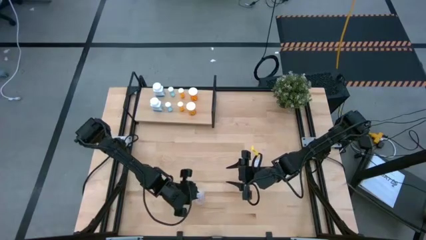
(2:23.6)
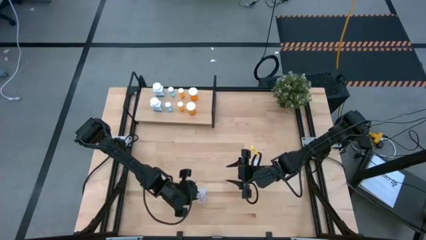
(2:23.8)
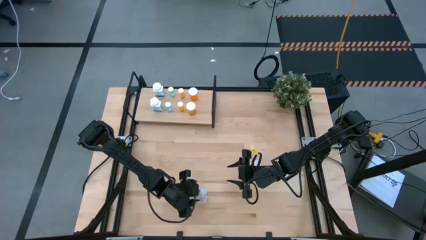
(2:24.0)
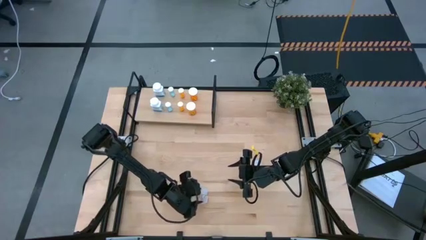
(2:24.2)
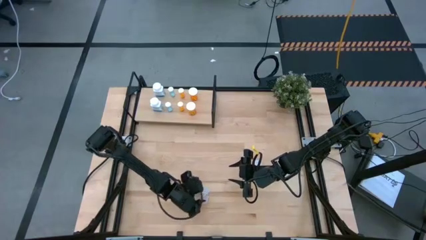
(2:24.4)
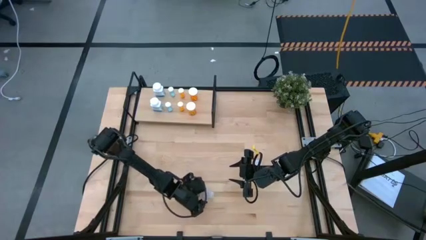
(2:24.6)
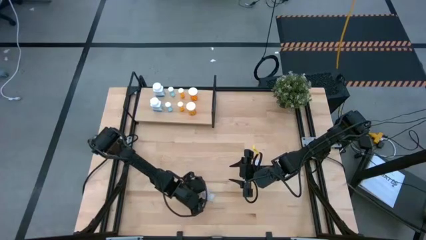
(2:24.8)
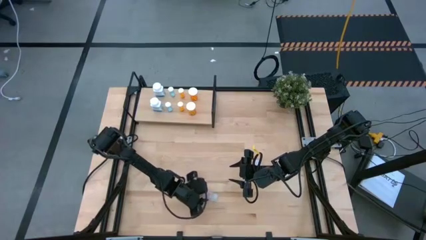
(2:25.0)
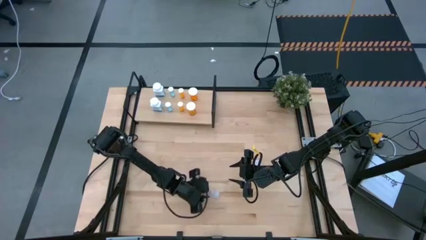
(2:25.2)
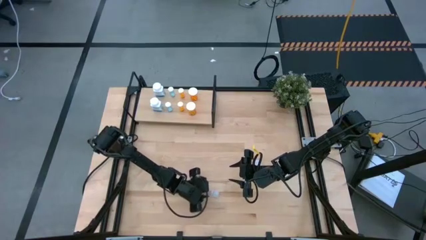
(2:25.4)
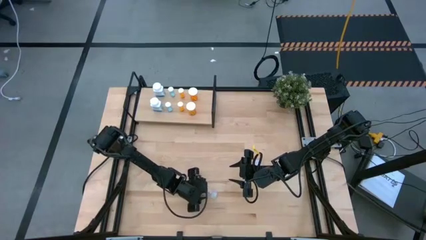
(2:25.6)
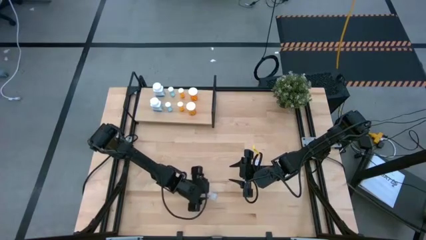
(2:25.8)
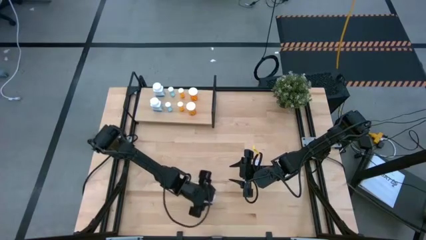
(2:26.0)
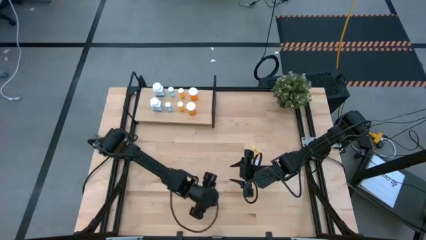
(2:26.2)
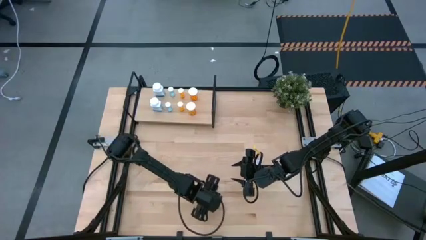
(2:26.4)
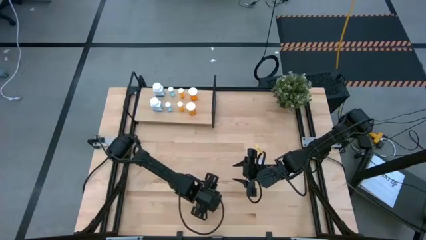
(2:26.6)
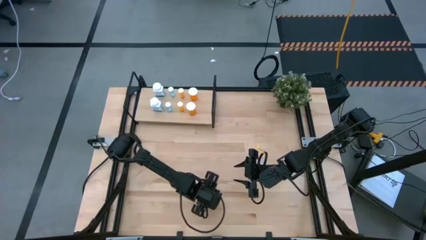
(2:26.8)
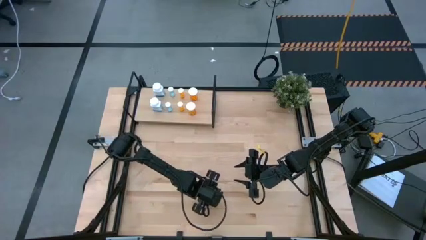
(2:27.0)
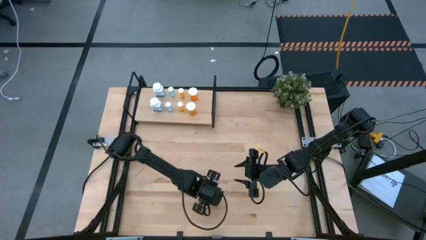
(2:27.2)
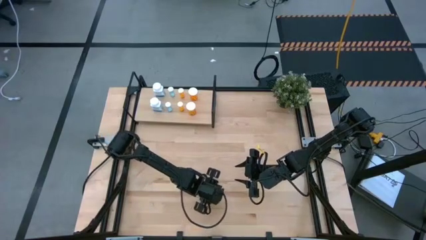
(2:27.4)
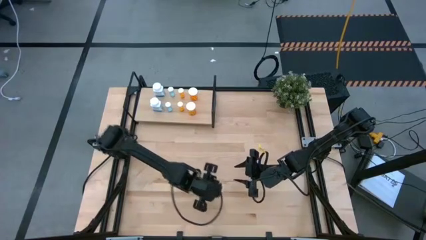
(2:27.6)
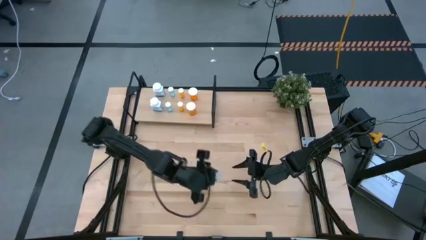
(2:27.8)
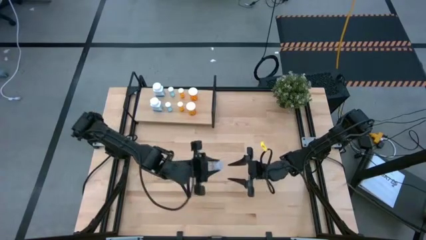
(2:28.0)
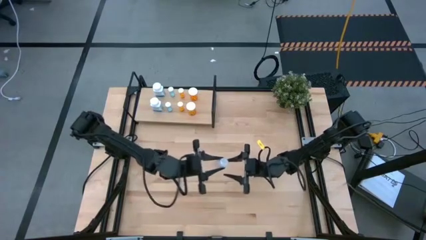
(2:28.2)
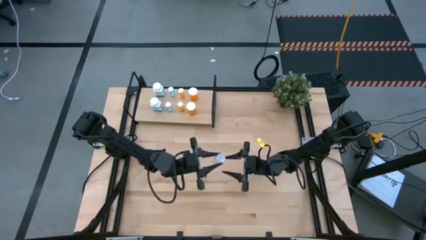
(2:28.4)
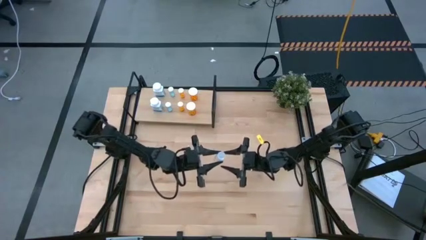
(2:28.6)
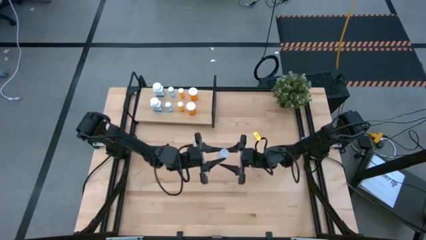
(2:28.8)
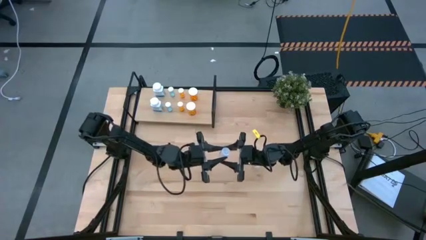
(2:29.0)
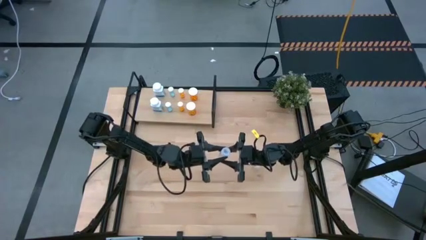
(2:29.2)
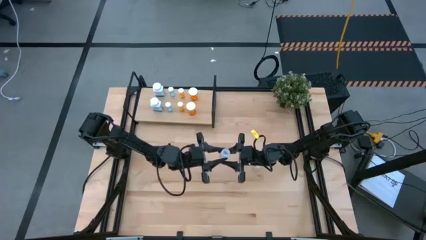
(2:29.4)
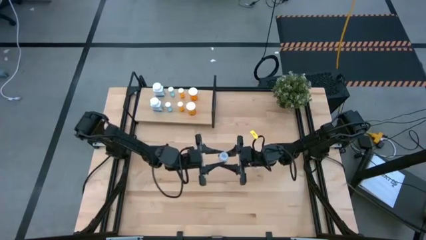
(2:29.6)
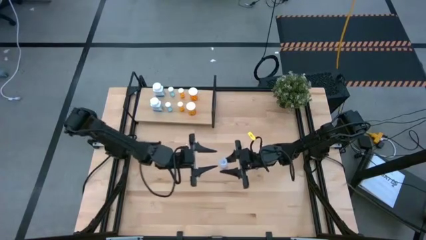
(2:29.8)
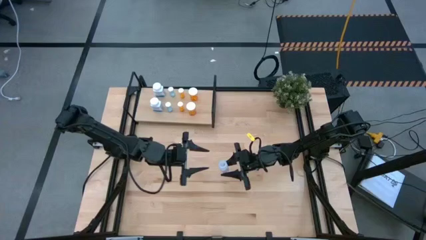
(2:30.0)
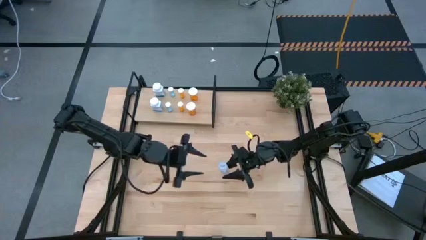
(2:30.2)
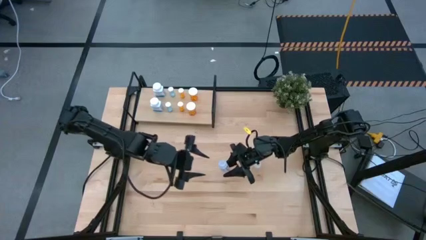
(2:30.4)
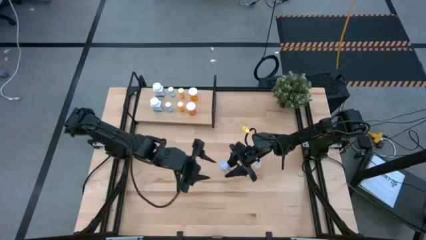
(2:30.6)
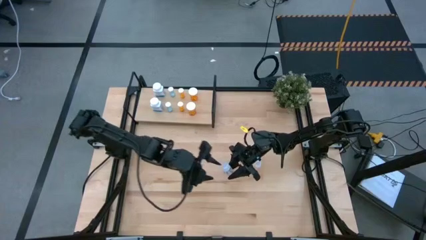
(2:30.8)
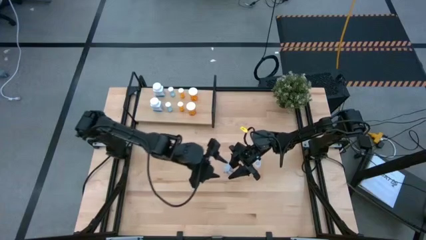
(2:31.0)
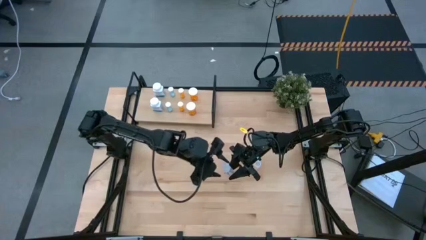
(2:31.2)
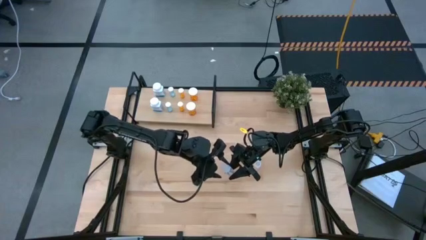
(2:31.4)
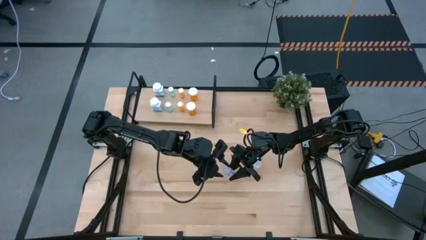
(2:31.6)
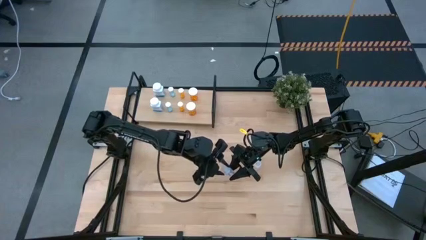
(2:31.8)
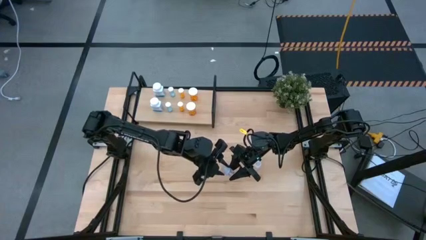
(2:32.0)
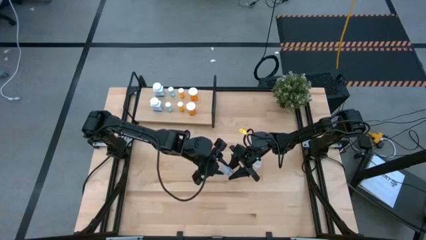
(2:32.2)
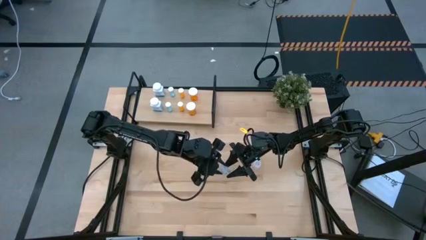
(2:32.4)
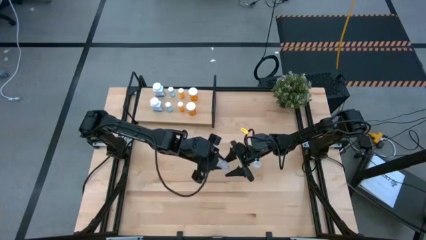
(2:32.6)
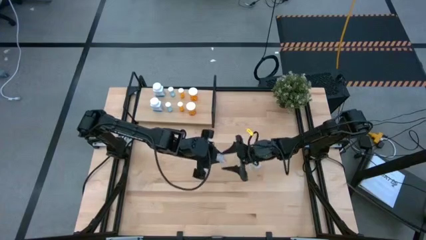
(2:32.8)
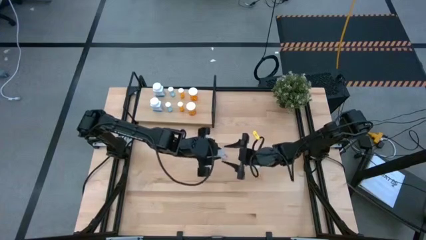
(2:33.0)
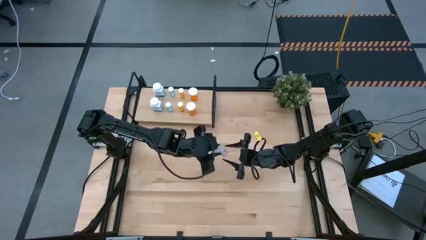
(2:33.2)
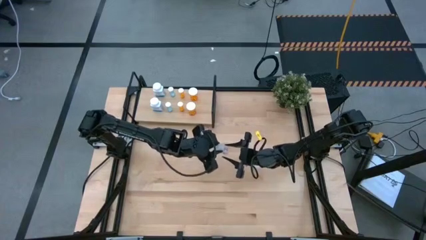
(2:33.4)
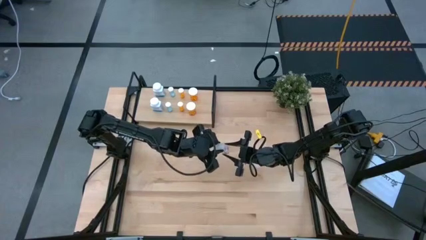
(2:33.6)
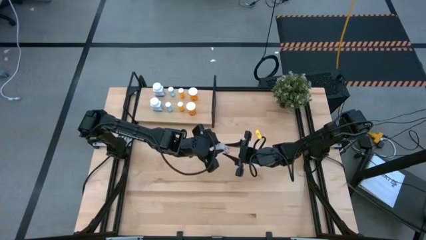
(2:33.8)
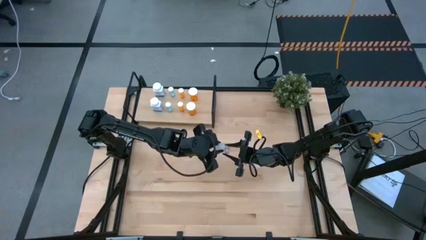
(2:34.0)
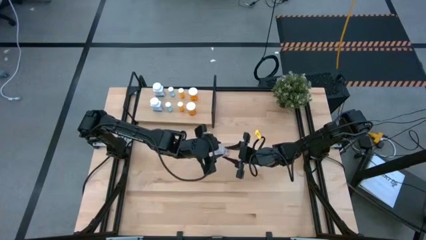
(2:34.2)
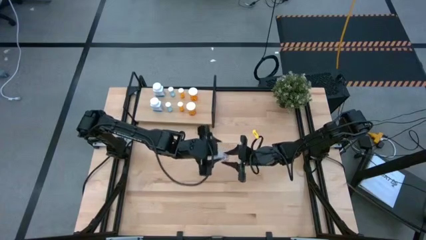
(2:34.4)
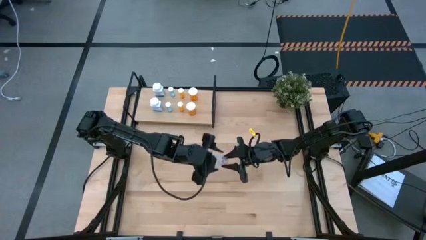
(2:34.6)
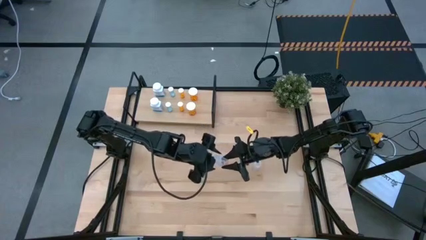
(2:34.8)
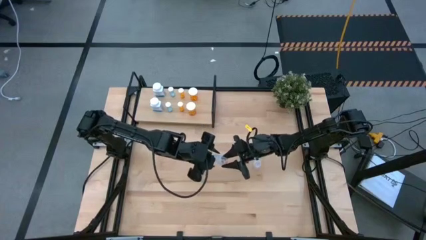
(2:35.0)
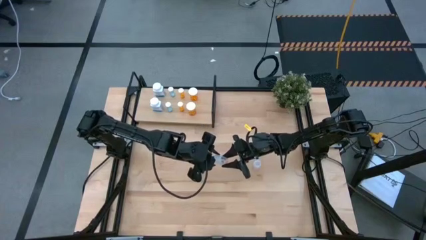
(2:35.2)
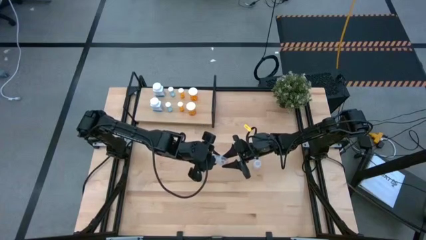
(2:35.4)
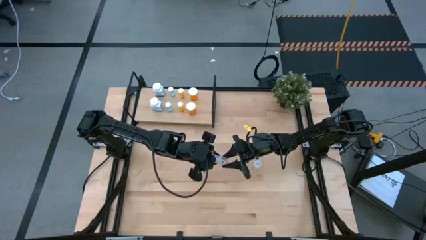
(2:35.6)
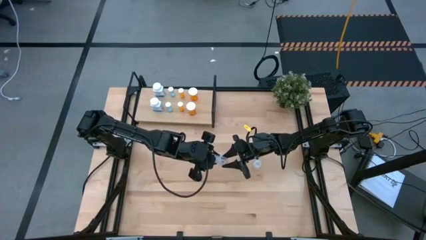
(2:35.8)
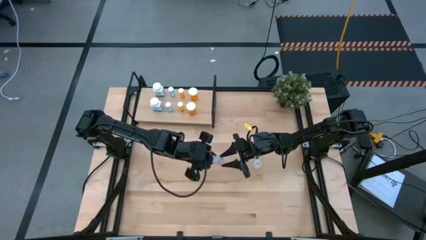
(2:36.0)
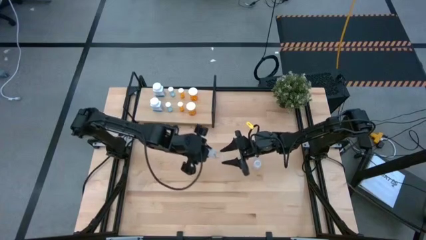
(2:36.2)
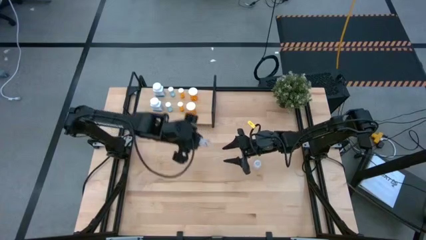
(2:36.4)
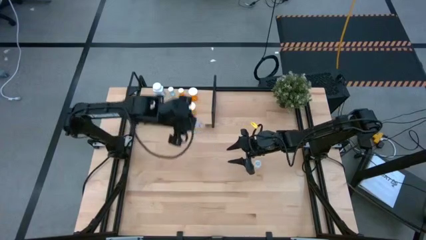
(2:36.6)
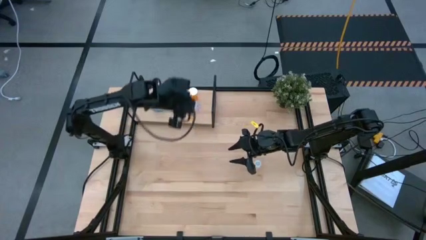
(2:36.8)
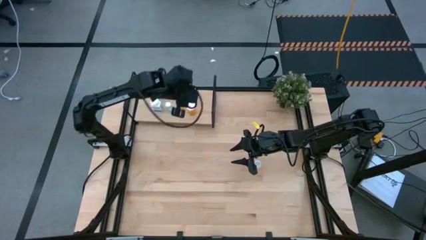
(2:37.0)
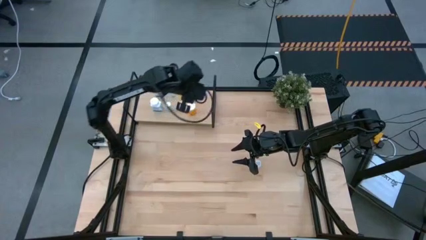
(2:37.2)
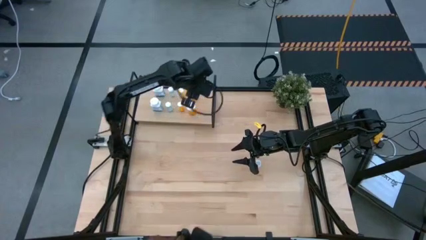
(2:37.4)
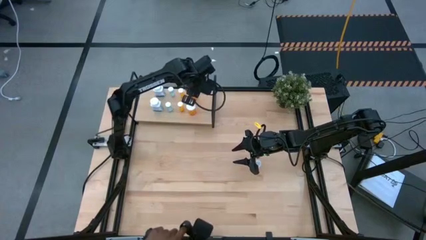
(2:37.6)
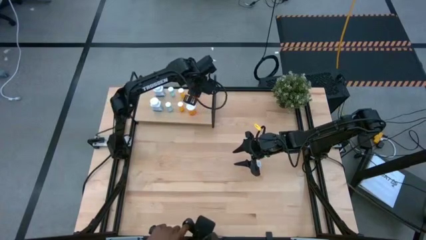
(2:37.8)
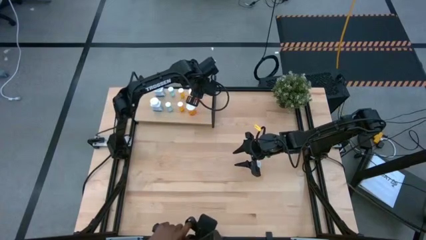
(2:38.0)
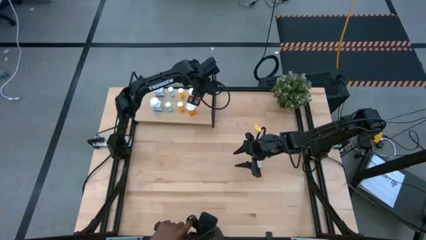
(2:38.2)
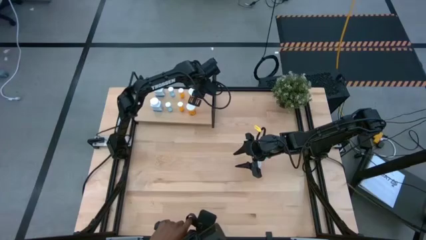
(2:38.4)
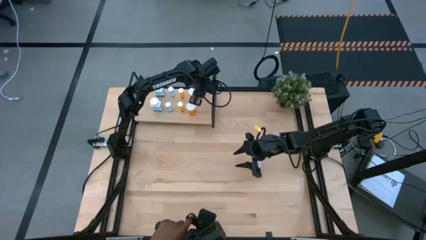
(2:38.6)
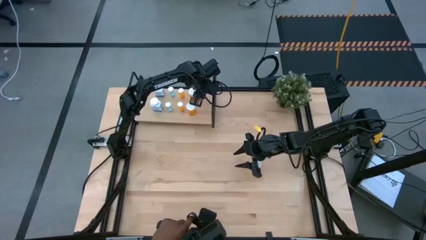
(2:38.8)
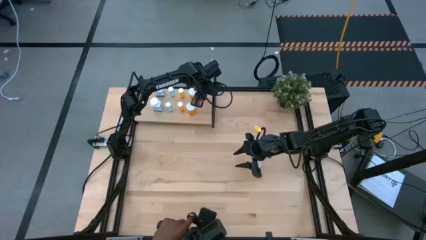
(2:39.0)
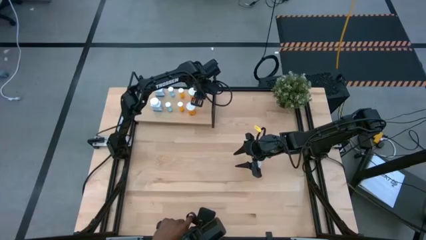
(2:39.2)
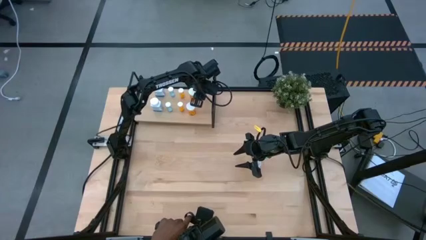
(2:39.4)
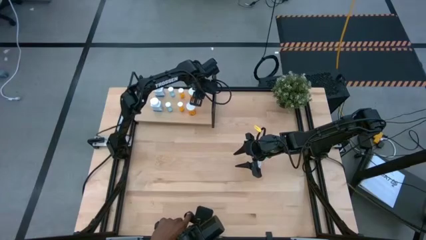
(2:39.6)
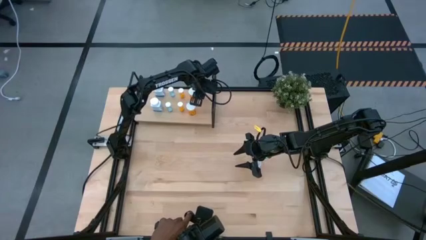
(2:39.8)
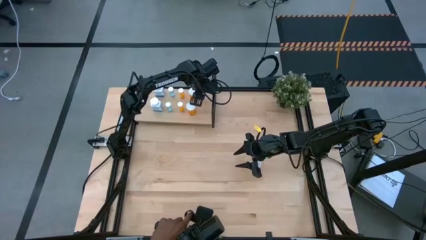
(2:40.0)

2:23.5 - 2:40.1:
Task: Pick and place medicine bottles onto shelf by color
Put the bottom transparent pill bottle on the shelf

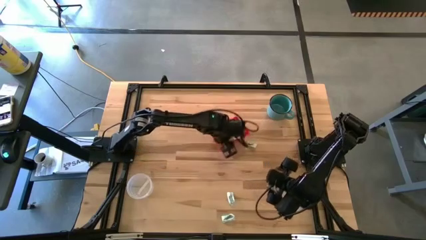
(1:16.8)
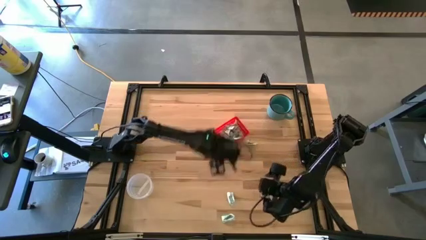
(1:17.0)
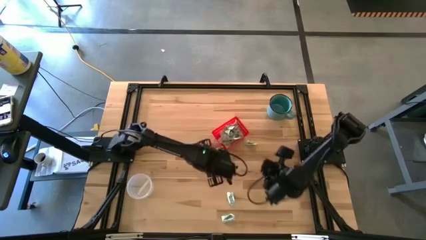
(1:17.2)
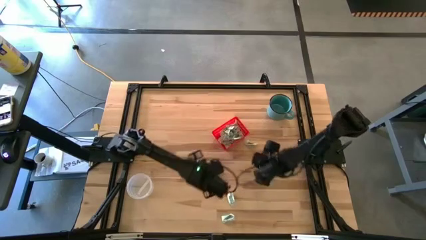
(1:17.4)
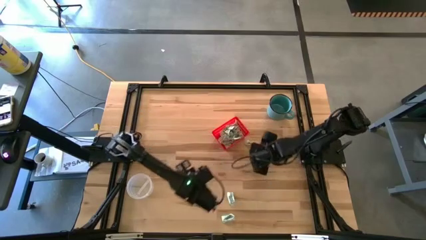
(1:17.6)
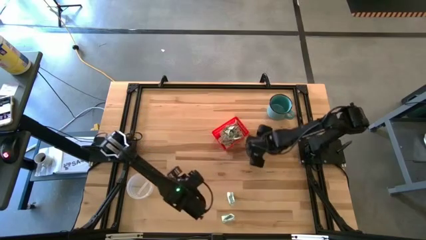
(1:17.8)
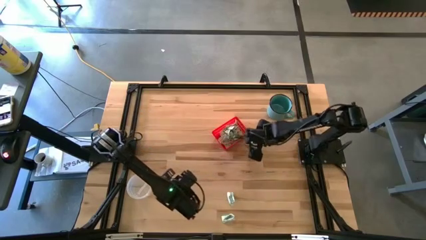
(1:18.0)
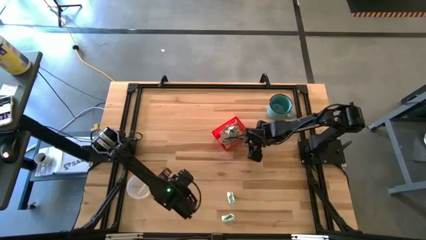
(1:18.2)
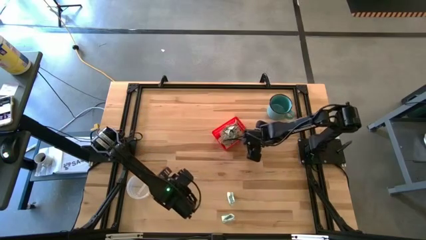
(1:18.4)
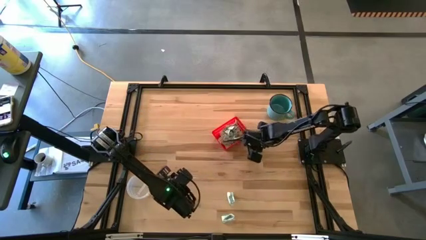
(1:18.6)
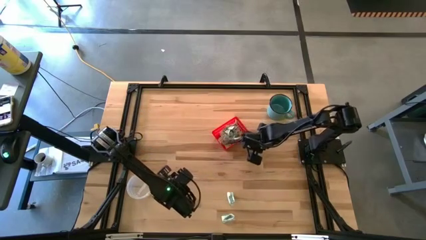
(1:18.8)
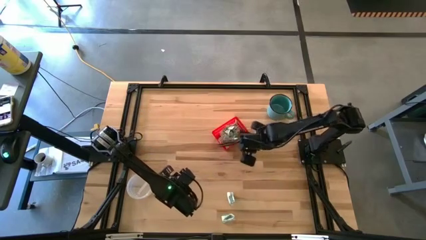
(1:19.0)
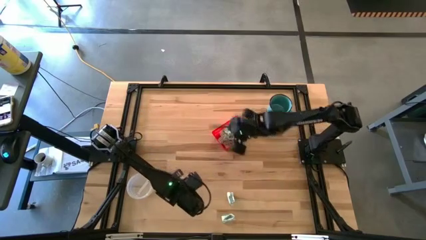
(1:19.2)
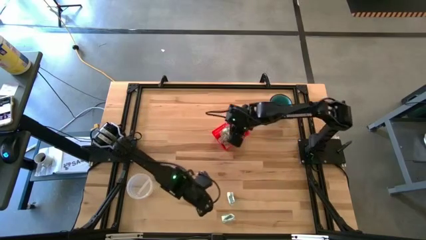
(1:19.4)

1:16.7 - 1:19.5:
Task: Pick and place items into bin
Put the stevia packet into the red bin
